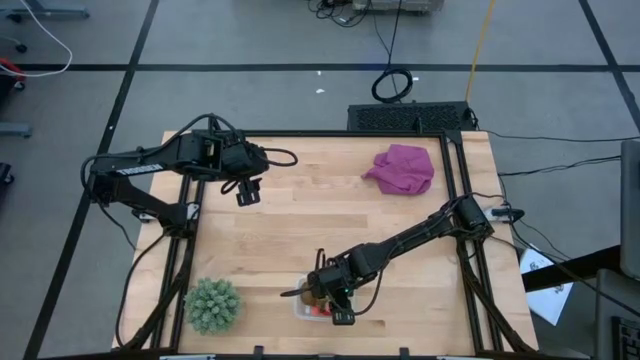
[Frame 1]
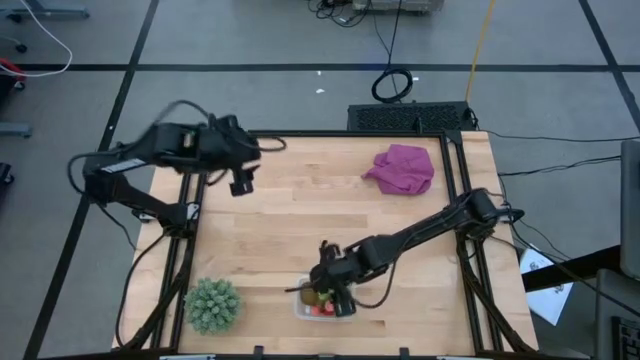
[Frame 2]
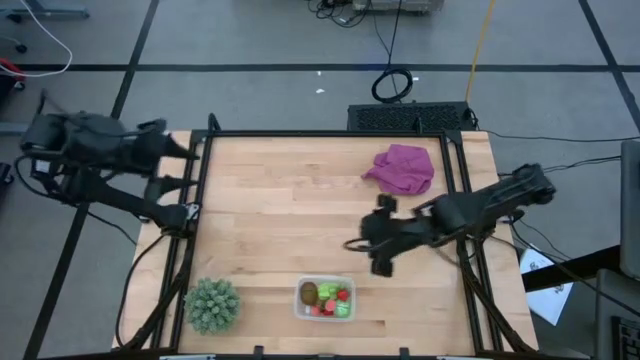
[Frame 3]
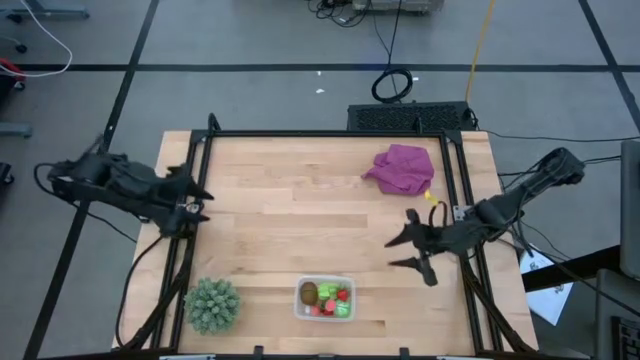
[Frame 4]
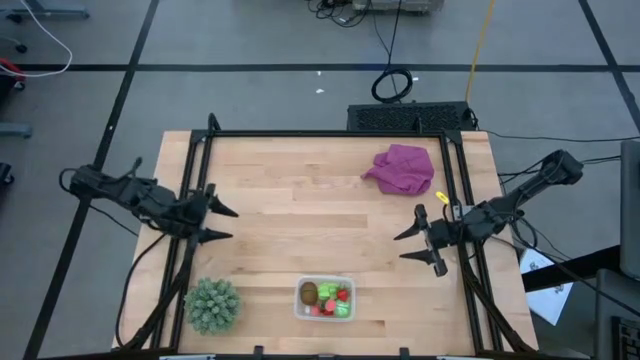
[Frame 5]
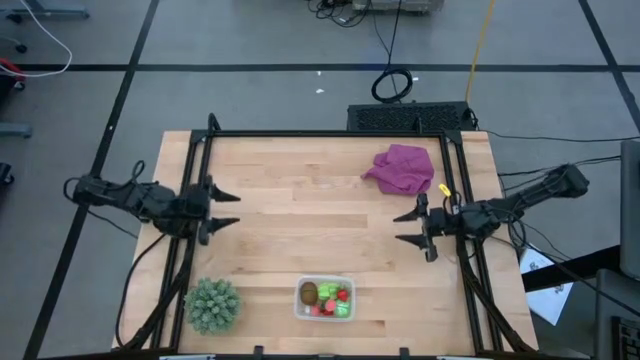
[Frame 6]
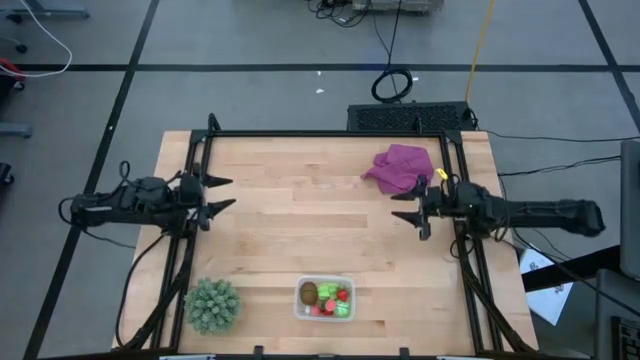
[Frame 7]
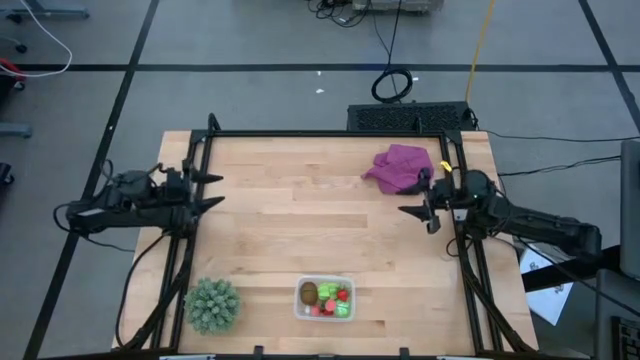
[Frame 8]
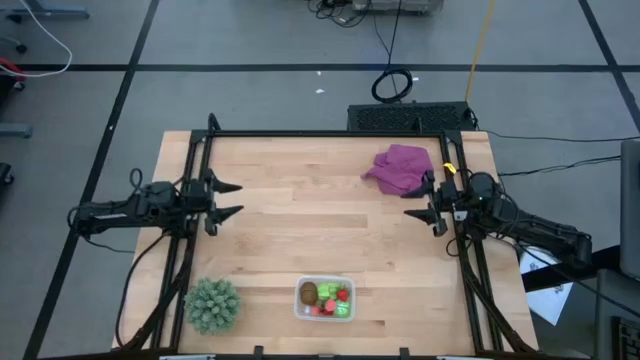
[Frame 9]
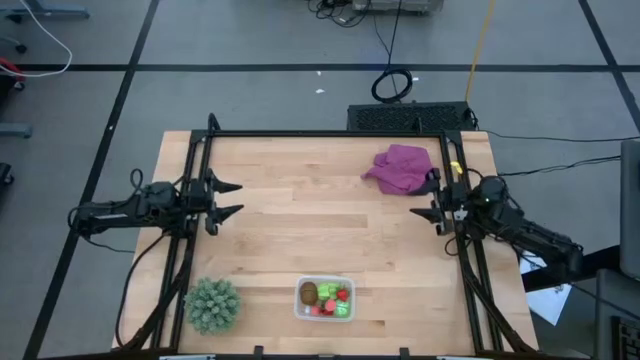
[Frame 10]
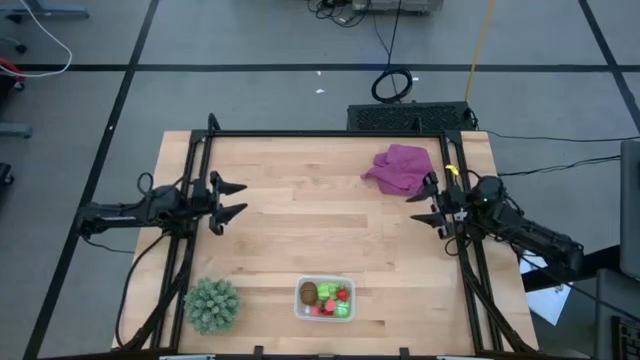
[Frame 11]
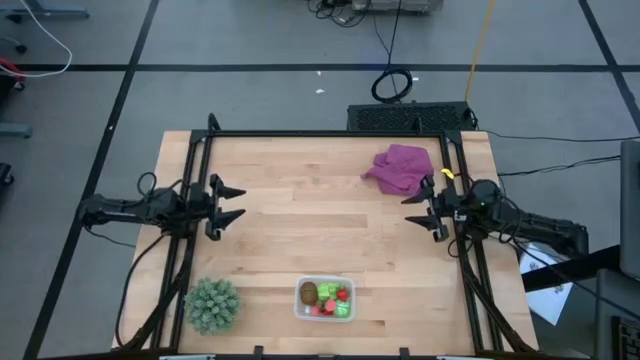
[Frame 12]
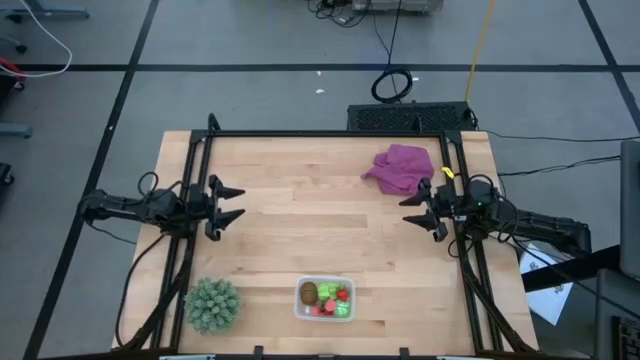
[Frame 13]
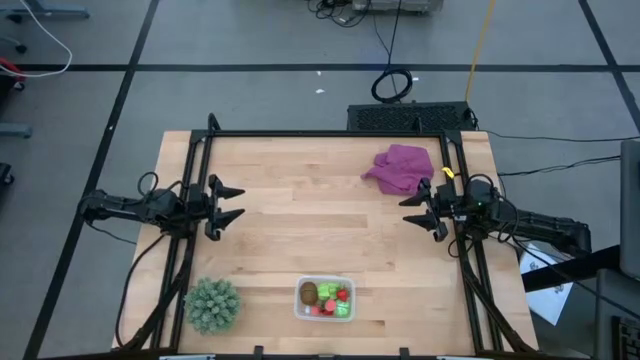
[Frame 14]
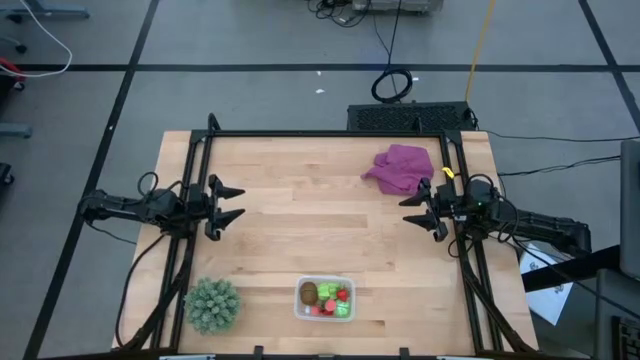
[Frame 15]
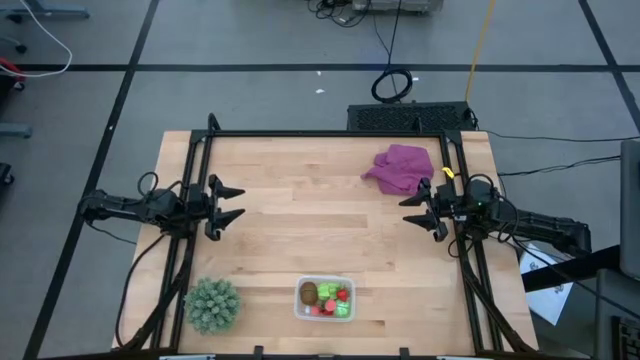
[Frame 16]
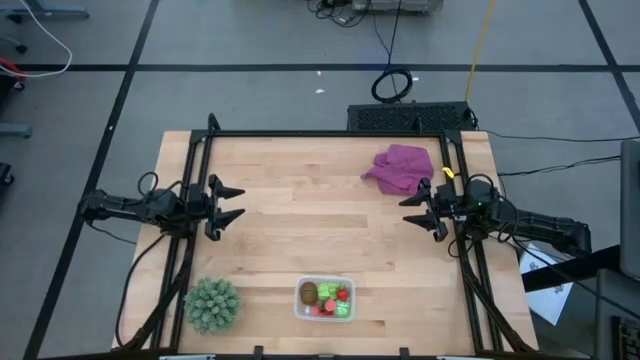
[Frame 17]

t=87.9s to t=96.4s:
Task: Pick and placing Produce into tupperware
Return to Home Position

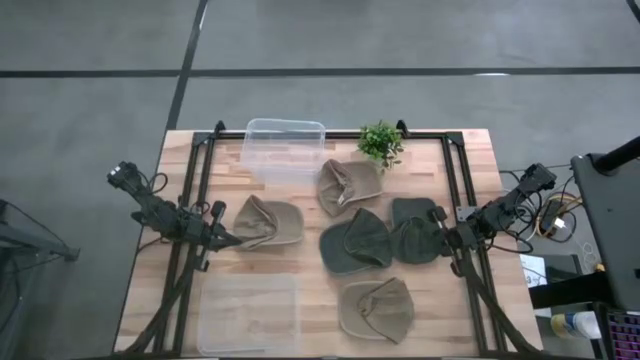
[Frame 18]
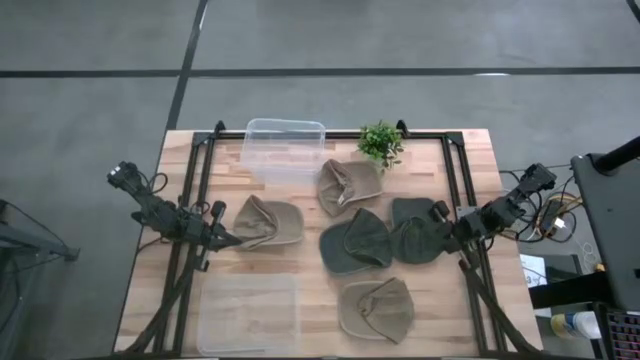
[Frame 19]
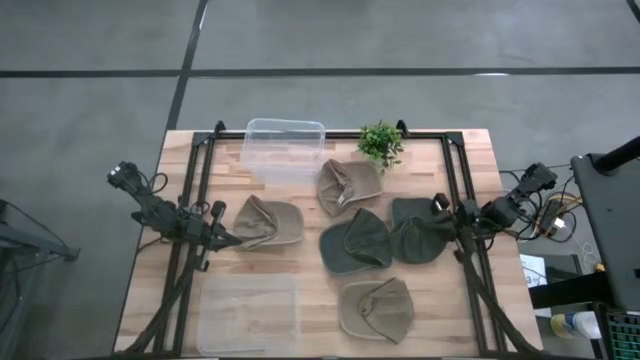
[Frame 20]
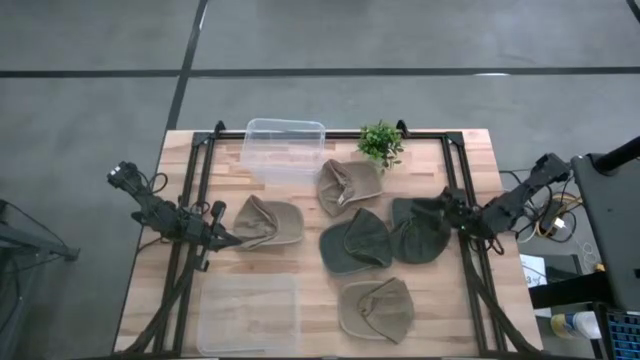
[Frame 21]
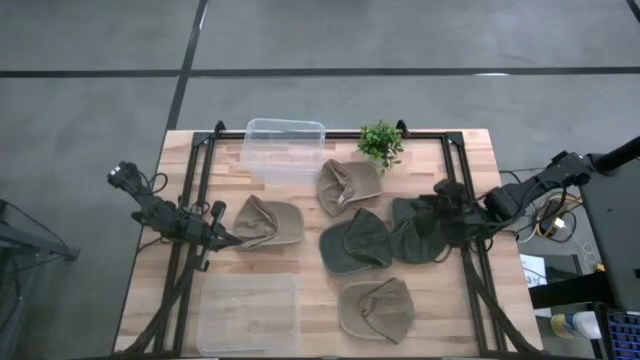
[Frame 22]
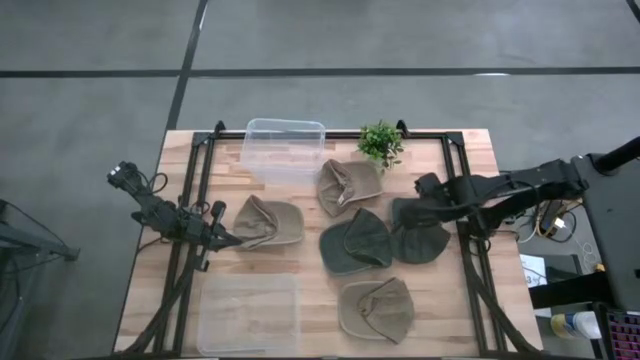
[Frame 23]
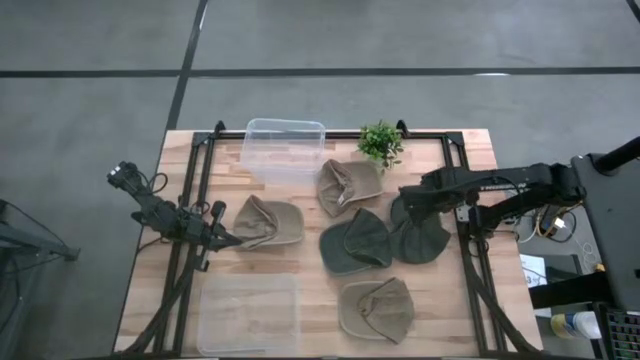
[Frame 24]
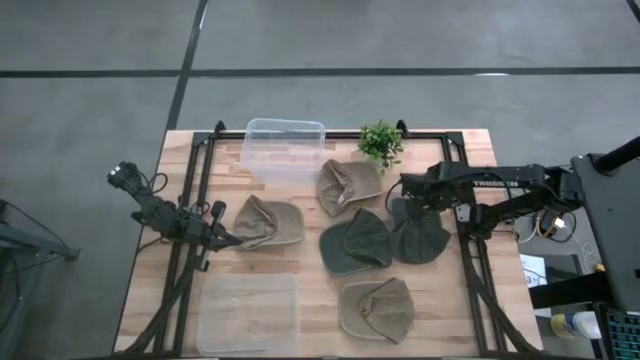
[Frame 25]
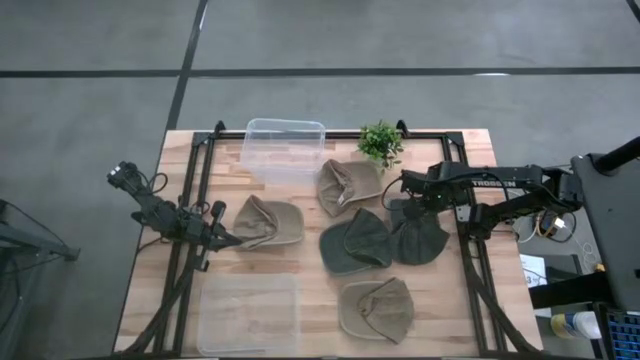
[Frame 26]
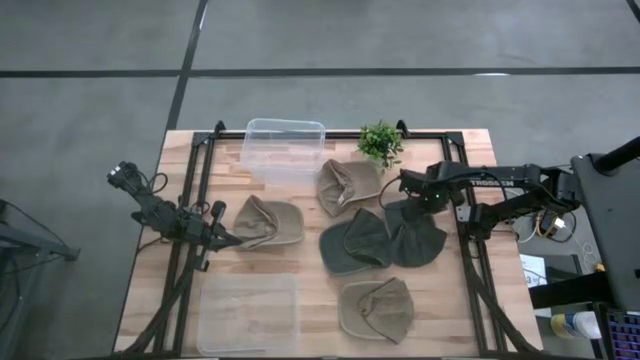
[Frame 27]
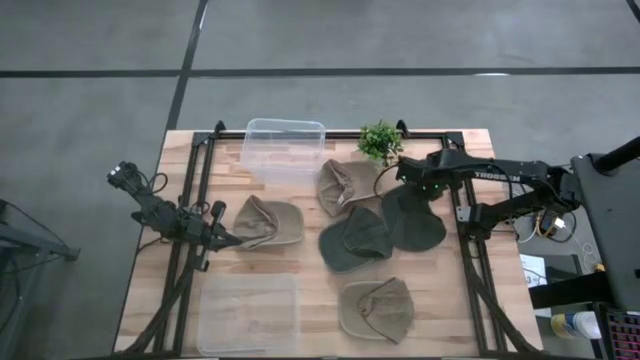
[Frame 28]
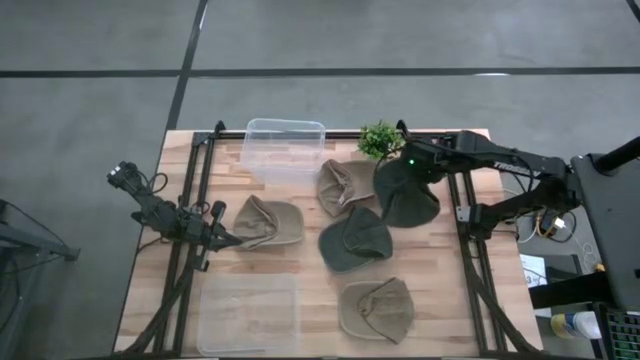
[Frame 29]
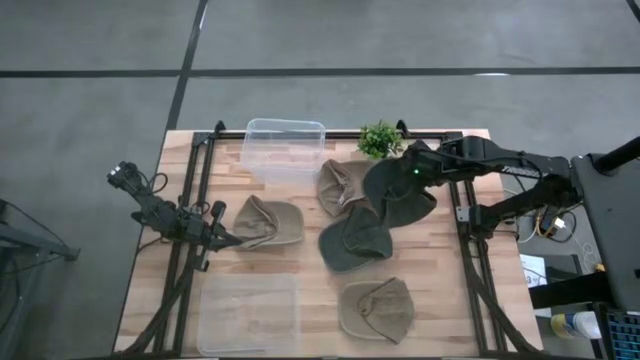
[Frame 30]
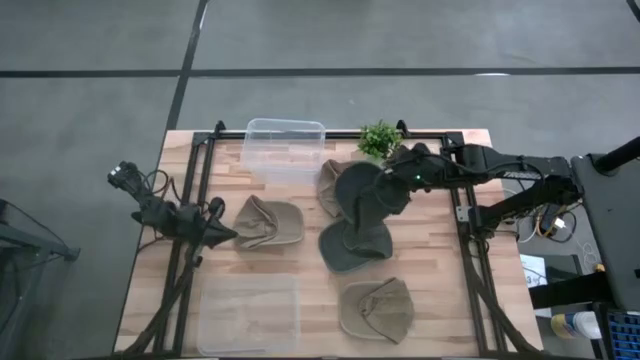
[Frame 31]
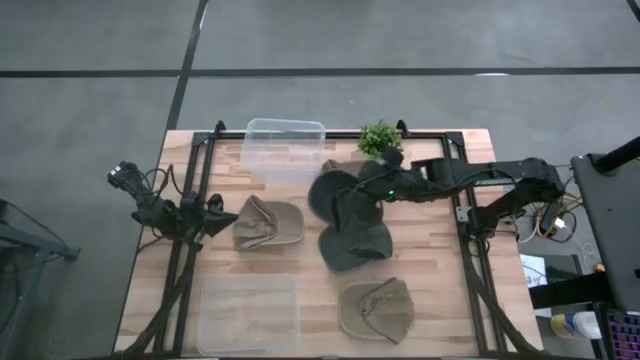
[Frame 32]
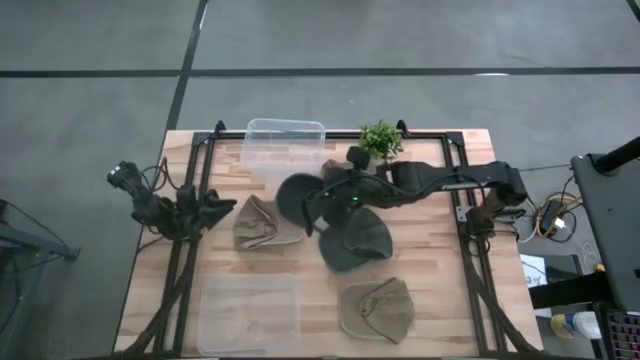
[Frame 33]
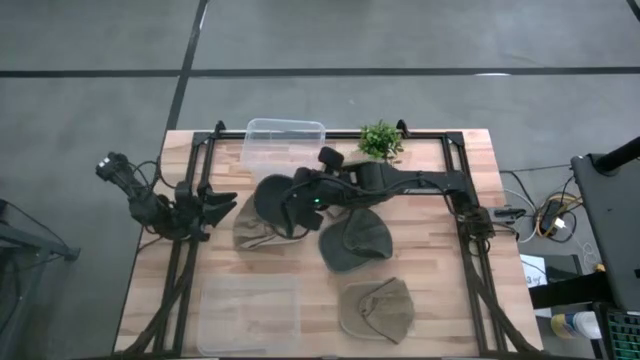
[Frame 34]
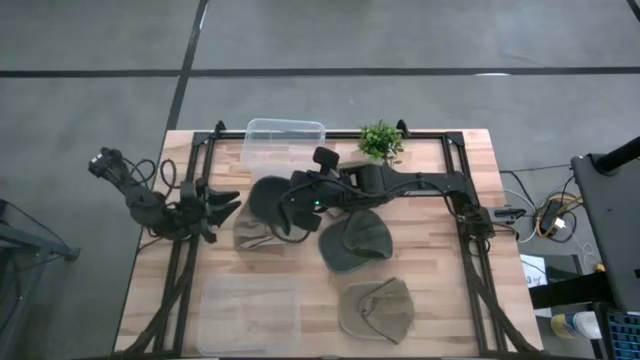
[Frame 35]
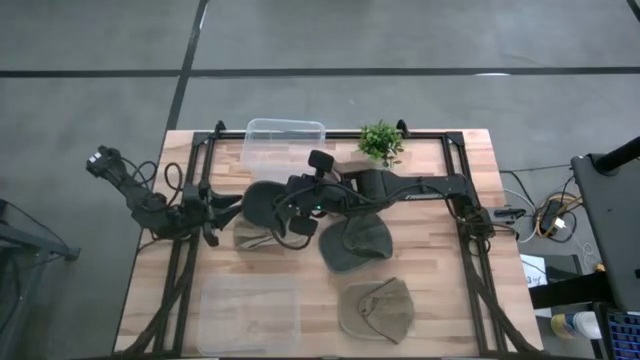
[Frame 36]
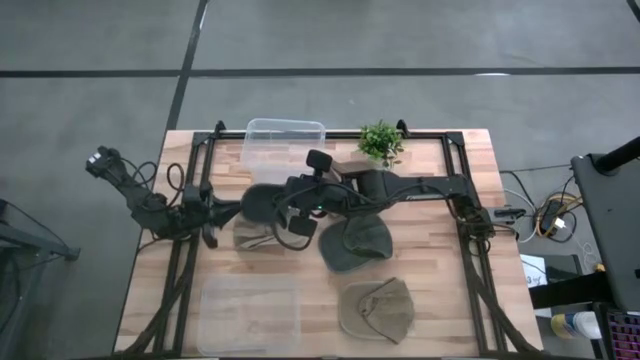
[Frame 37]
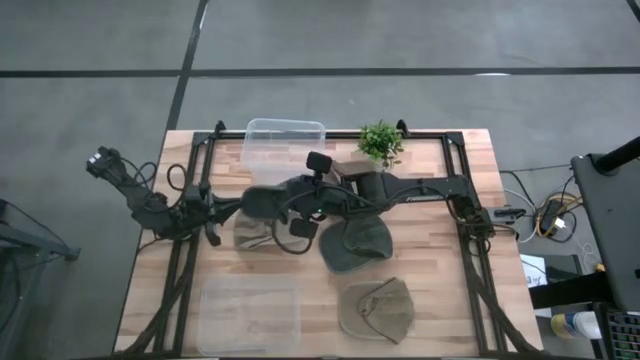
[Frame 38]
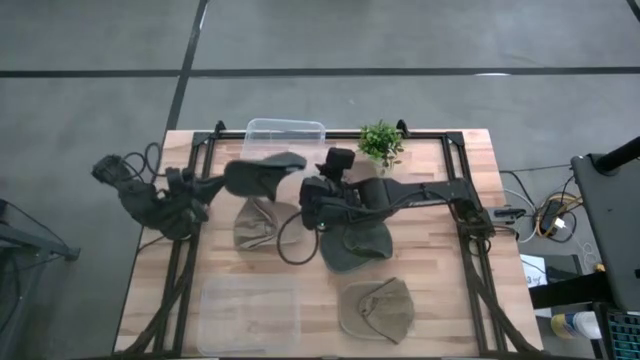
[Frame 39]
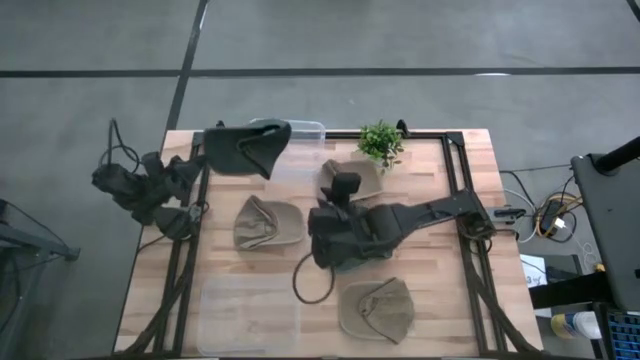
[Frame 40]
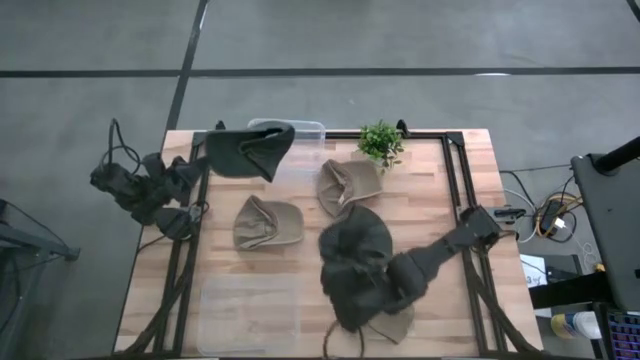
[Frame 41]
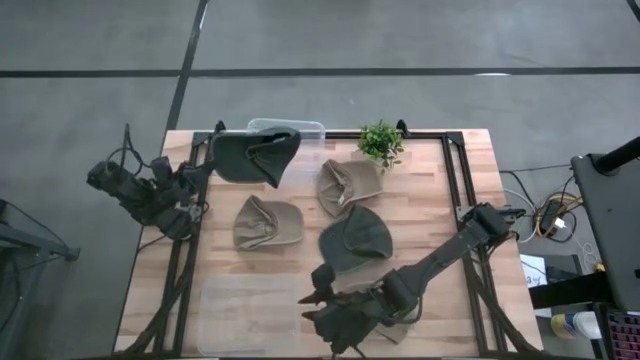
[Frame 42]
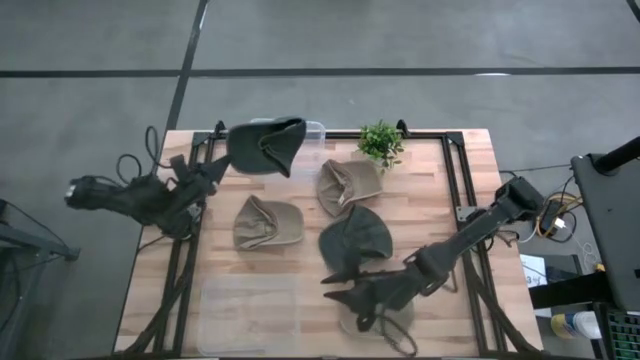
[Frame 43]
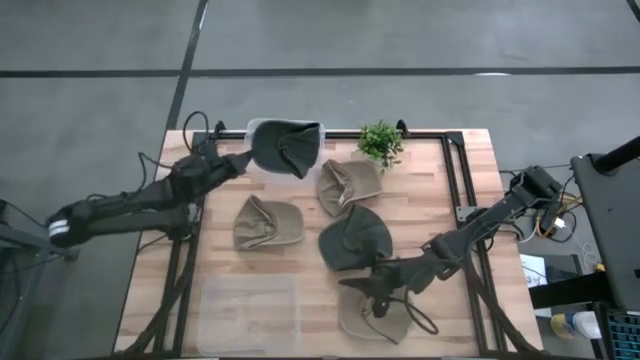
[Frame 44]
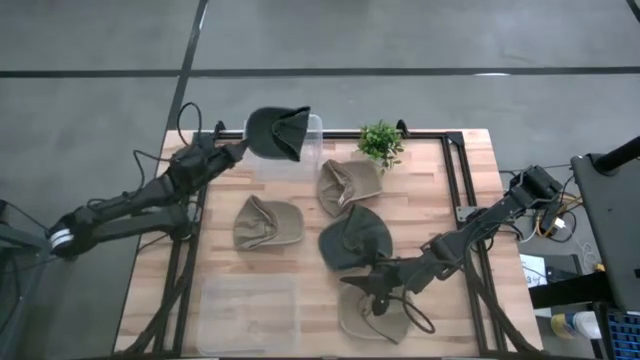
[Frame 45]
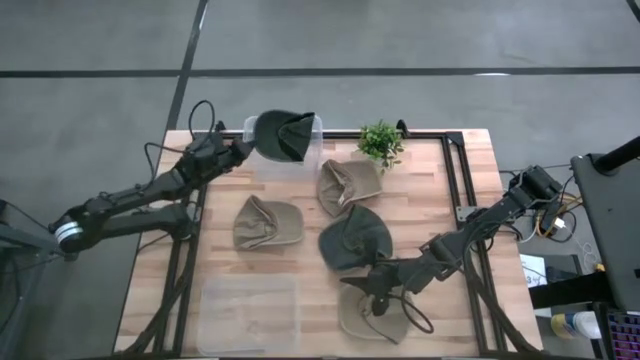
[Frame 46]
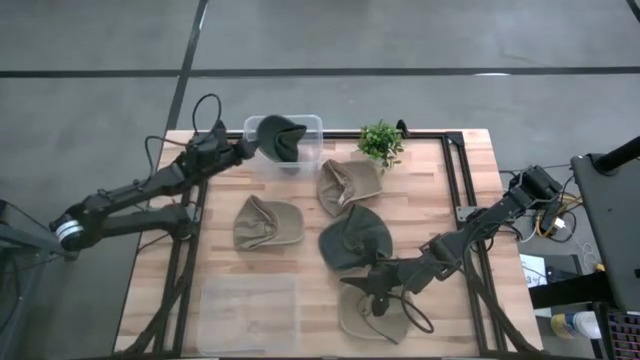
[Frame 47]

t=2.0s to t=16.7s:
Task: Pick & Place hat
Put the right gray cap in the top transparent bin
